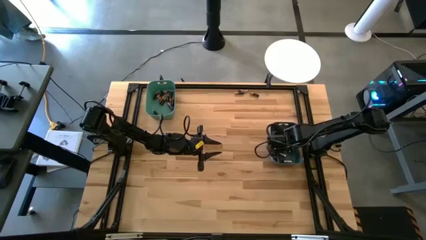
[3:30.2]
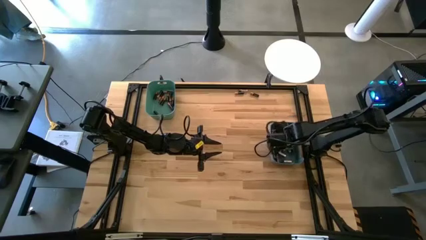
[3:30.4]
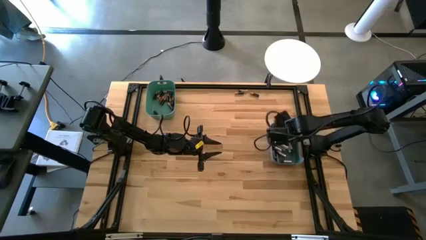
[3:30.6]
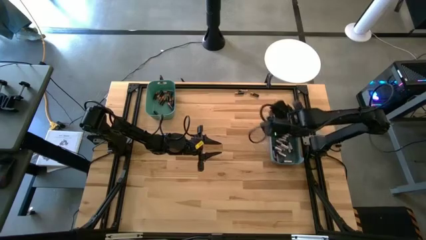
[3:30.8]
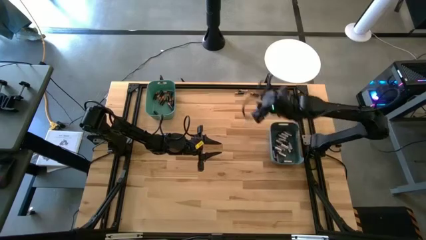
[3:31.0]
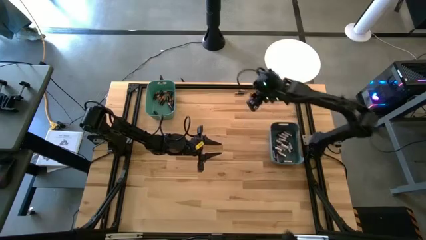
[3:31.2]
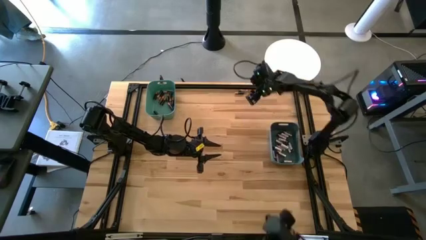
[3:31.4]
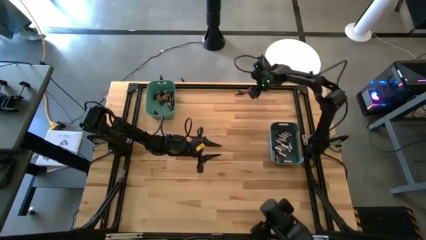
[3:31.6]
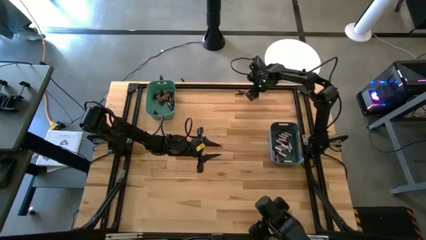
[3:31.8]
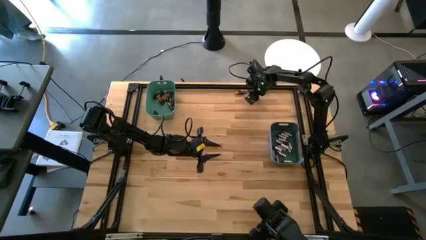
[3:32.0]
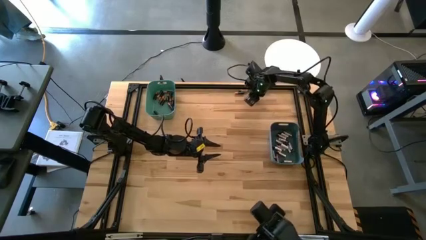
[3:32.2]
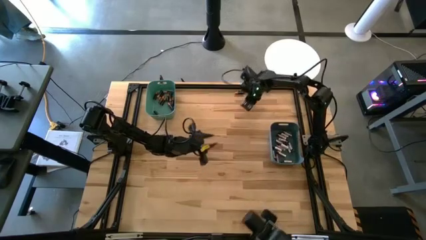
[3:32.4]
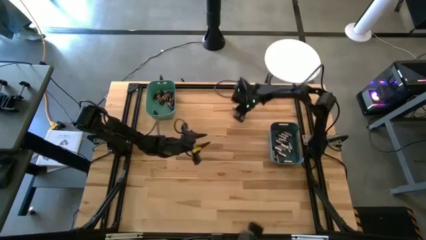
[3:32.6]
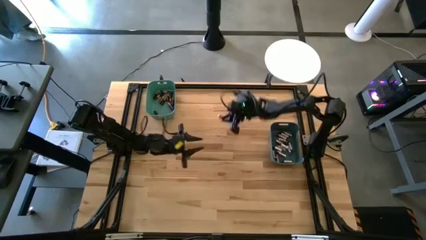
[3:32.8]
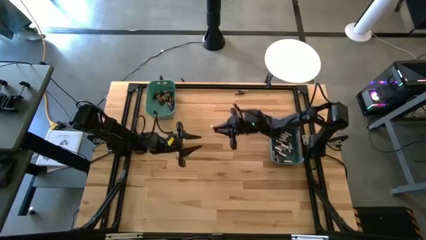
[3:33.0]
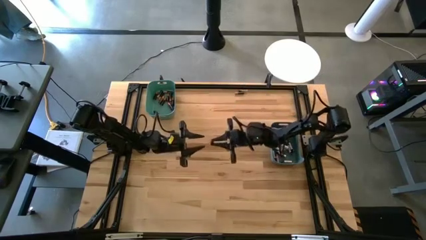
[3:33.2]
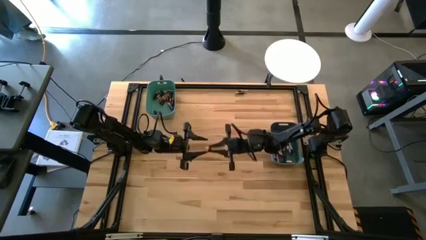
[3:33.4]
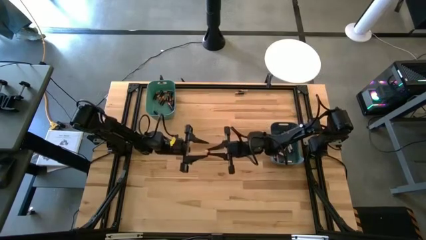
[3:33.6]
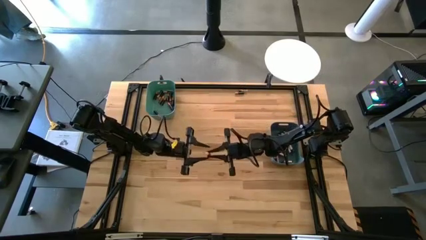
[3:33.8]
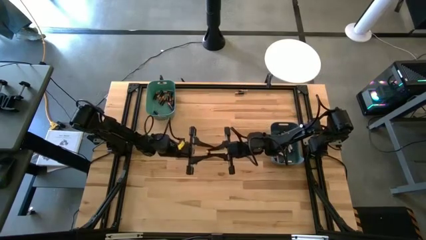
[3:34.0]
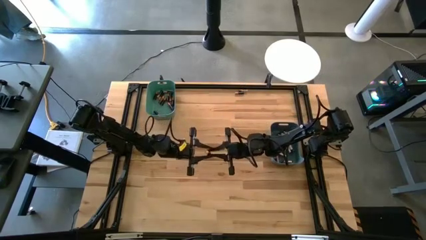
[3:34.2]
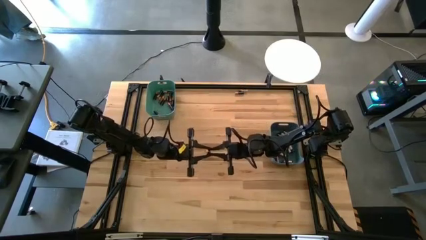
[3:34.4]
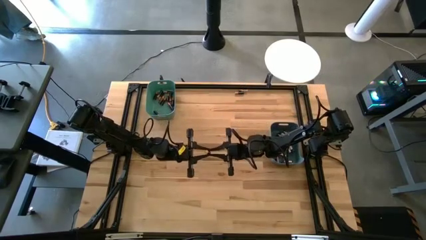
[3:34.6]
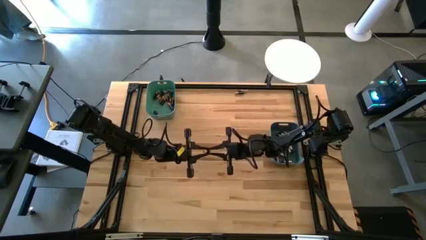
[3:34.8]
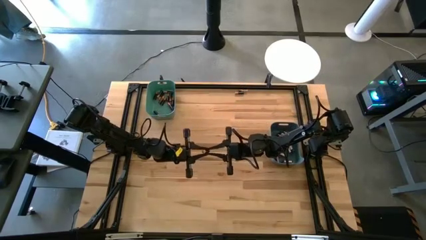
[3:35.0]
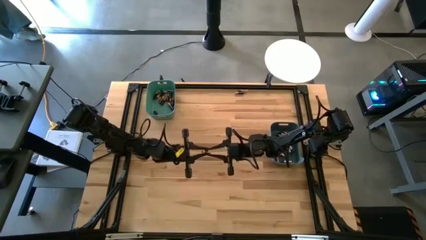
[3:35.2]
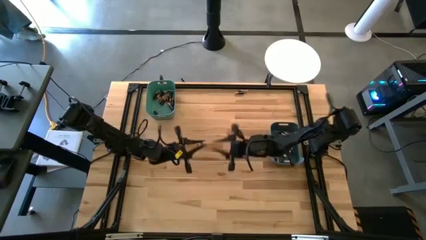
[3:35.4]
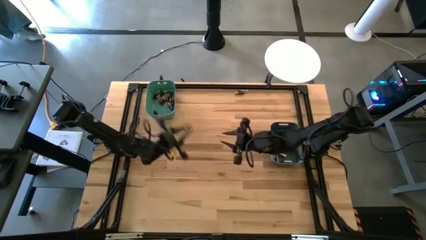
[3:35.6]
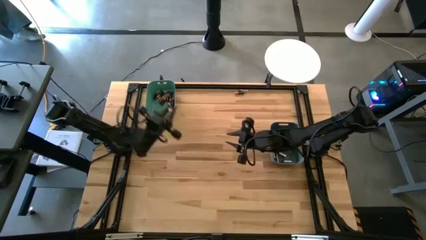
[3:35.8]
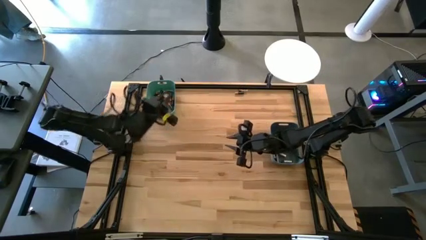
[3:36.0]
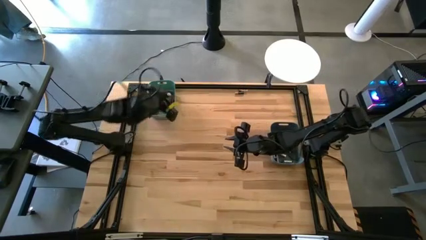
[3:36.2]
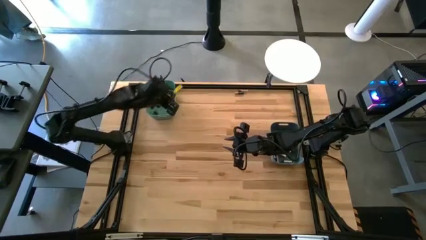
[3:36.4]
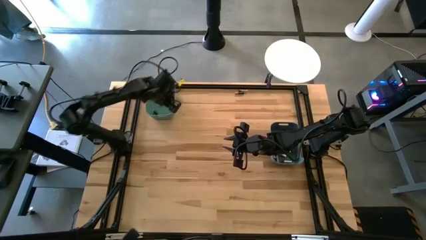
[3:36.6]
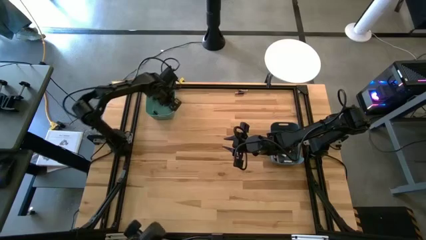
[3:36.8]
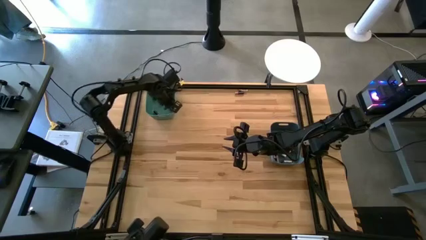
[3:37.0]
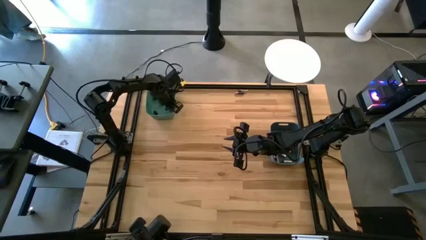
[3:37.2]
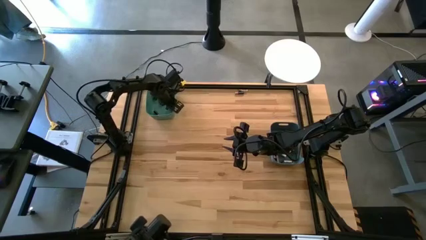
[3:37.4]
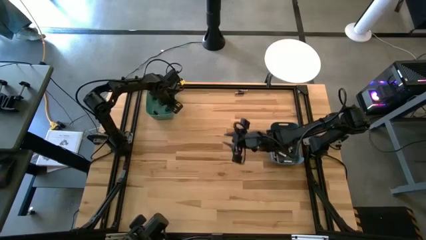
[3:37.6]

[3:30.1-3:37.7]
Task: Sort batteries
Put the black battery into the green bin

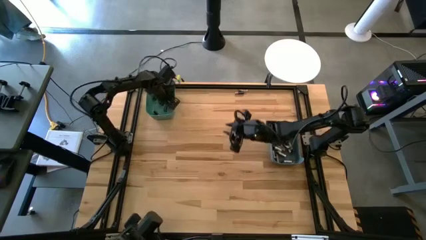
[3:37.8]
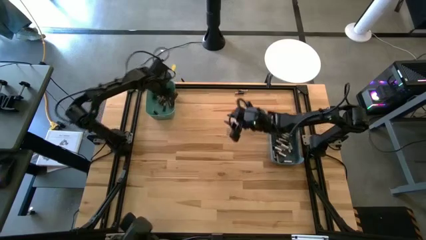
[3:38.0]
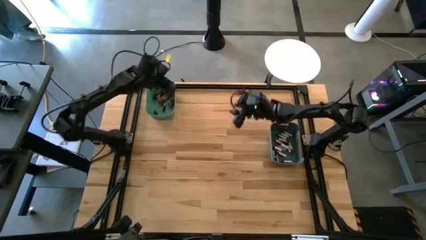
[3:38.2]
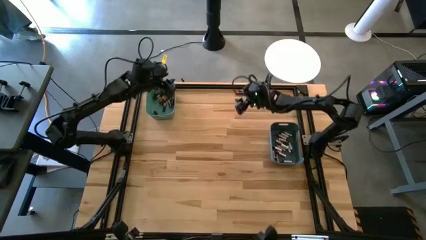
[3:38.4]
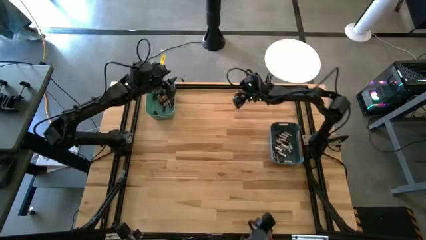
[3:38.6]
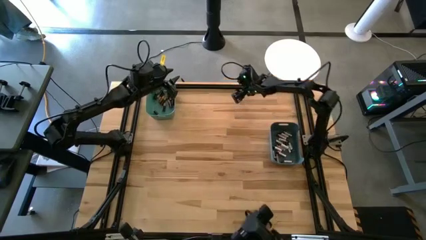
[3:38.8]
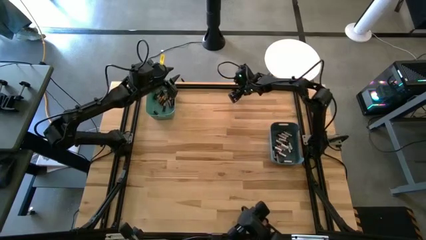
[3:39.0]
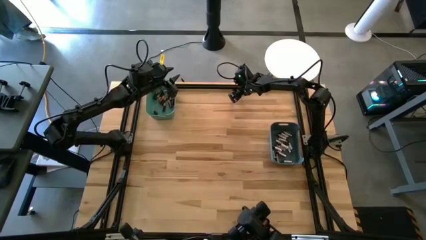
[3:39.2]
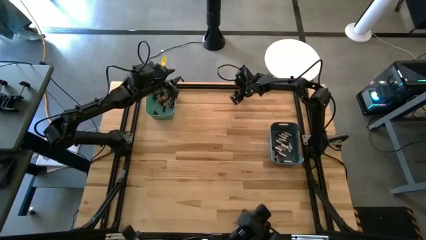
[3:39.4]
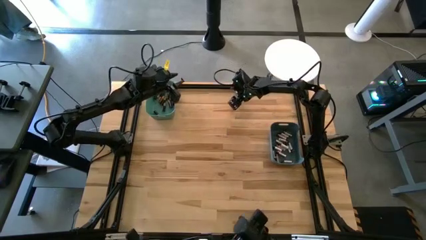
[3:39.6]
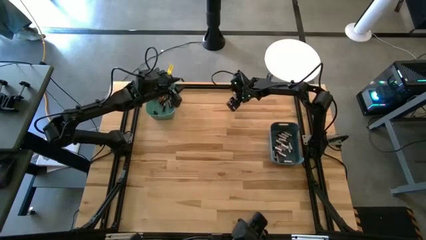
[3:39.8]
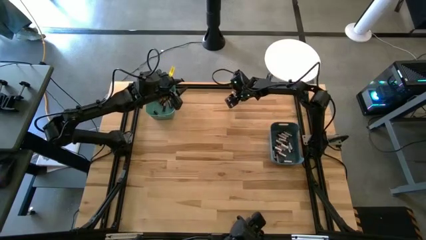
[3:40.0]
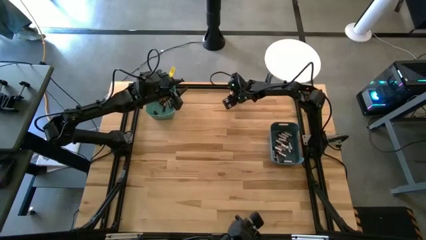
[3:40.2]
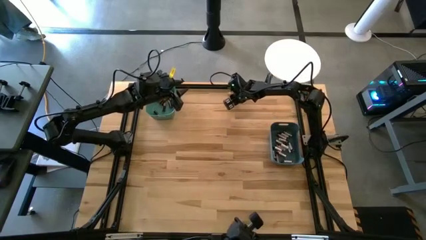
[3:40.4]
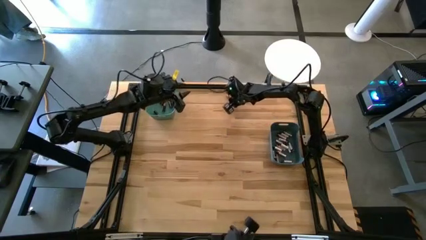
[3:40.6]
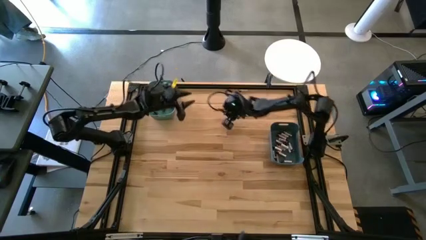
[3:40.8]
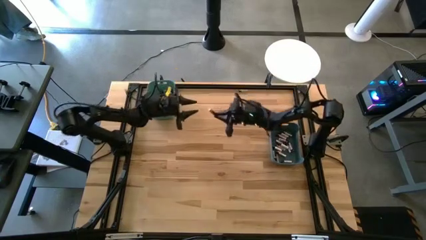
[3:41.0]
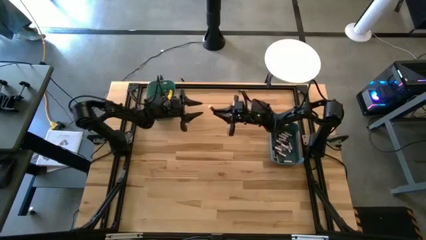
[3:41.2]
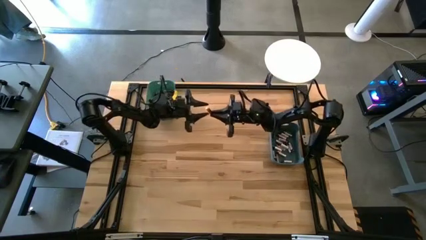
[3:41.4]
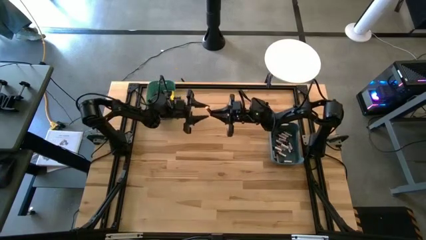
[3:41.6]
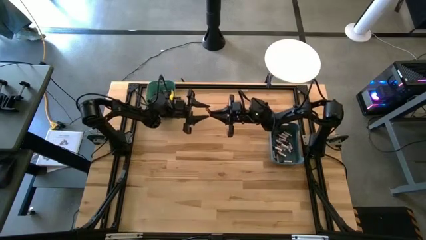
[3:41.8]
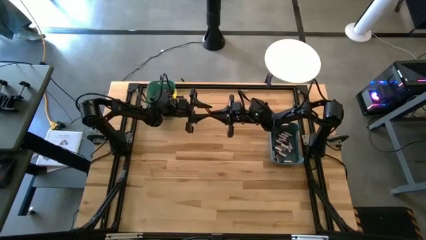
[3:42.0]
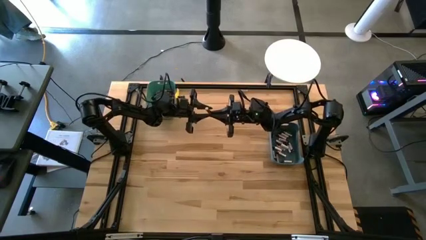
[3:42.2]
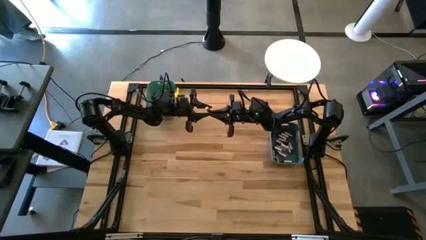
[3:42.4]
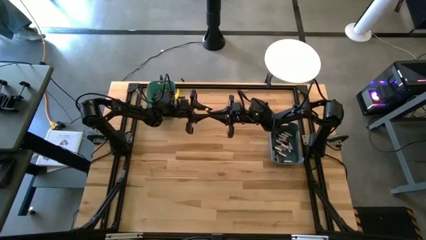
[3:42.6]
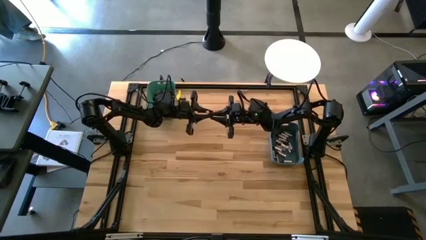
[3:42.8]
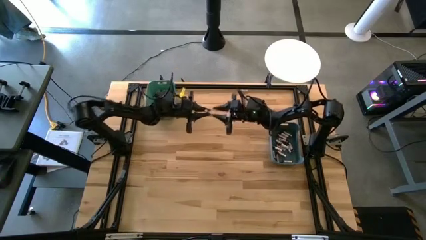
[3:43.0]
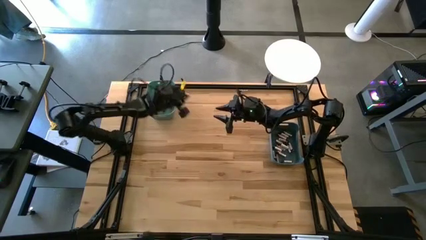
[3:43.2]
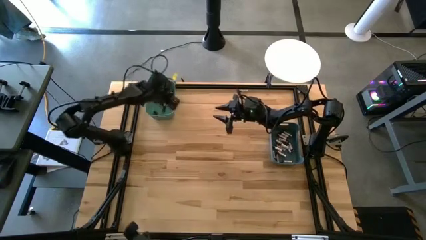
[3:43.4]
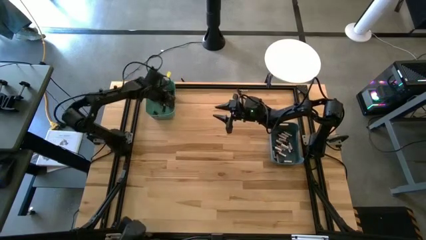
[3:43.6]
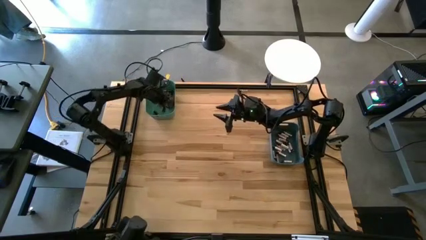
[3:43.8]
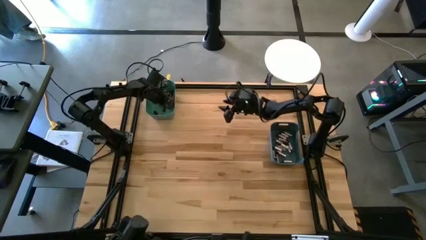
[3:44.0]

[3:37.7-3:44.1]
Put the black battery into the green bin

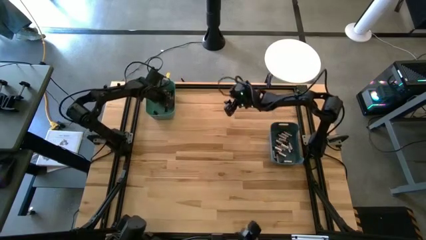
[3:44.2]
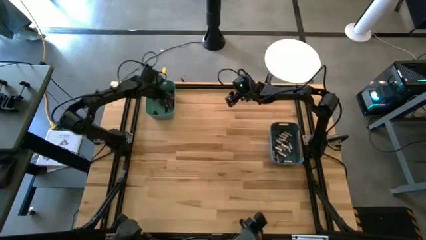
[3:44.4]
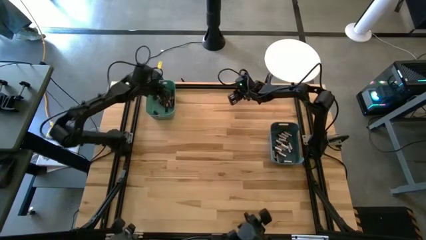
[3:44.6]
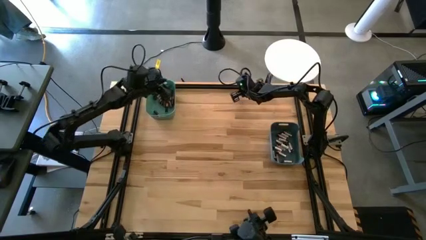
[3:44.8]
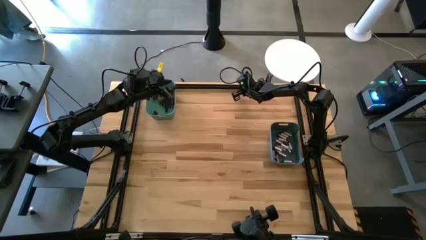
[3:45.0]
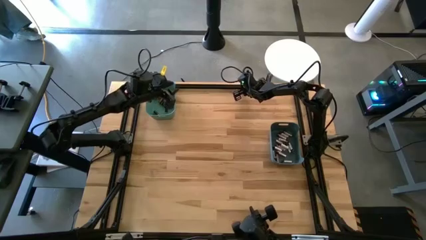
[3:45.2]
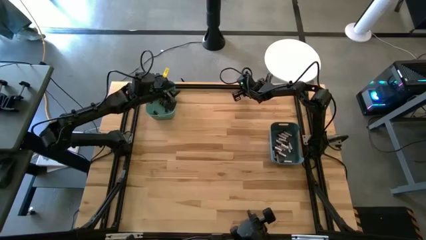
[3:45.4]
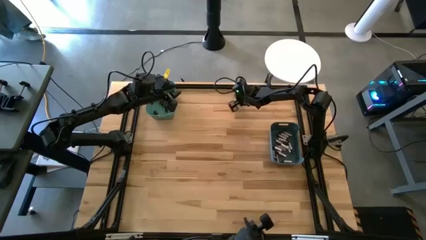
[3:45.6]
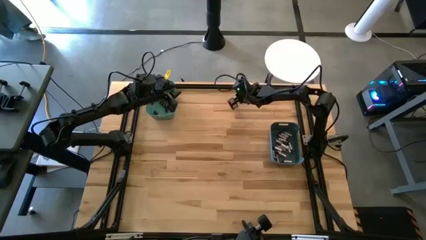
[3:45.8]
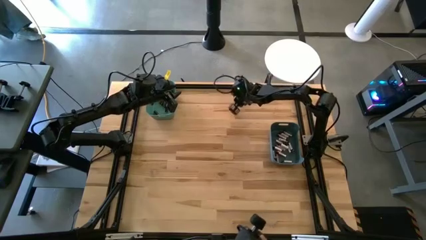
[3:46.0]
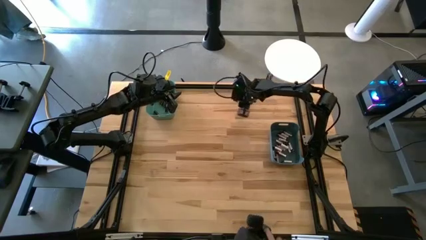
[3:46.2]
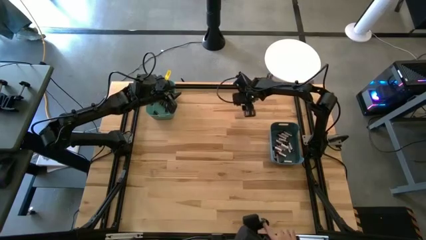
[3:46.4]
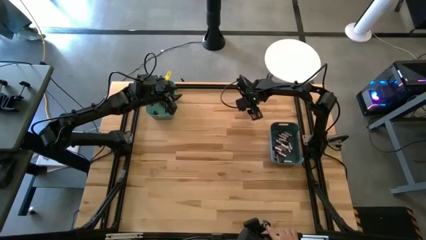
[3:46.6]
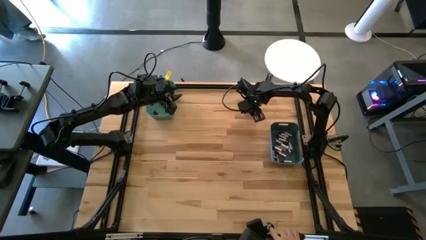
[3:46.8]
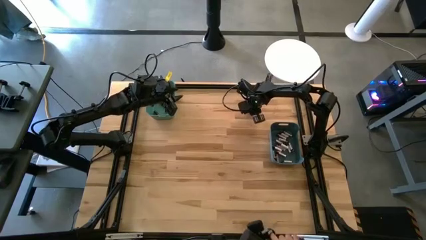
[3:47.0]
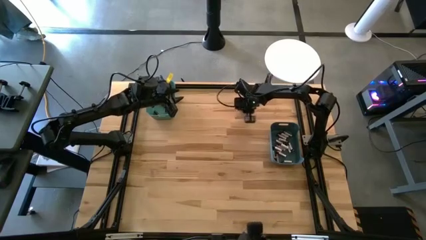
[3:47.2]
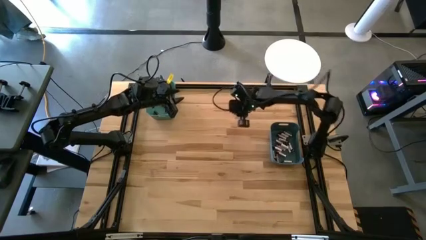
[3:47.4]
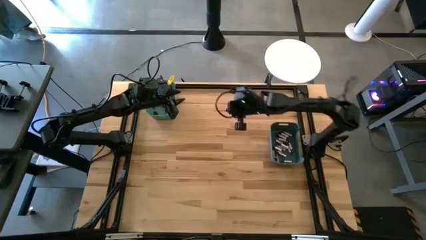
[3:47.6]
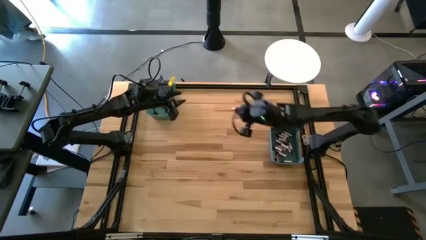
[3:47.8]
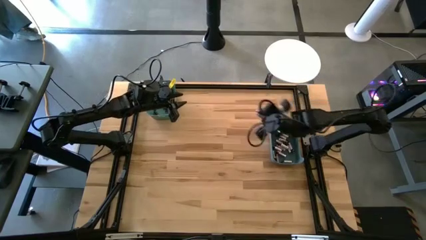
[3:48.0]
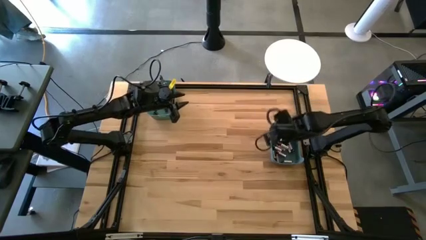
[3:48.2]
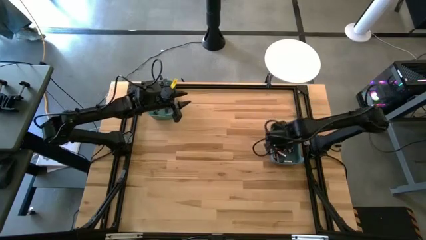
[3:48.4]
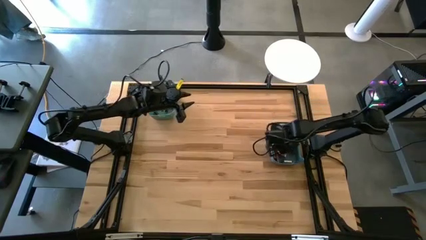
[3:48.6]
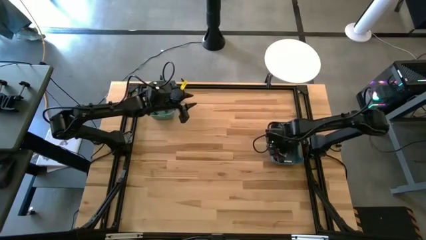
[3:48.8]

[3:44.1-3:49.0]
Put the silver battery into the blue bin
